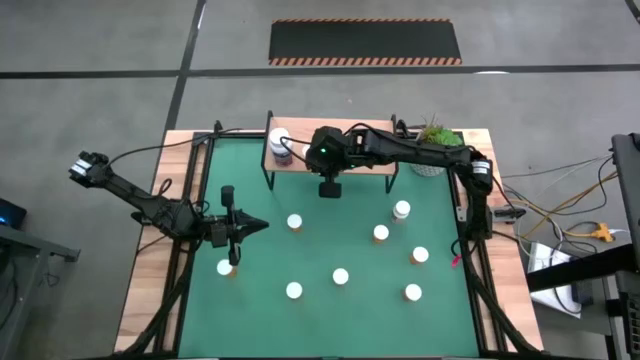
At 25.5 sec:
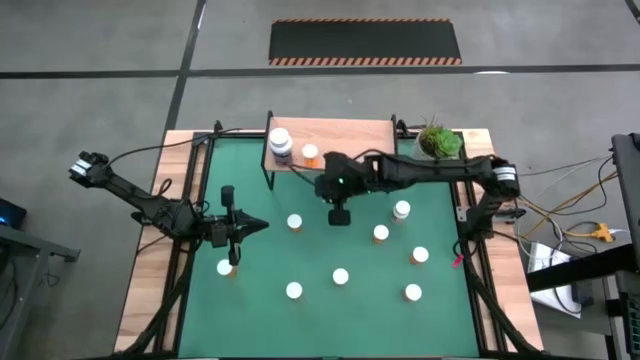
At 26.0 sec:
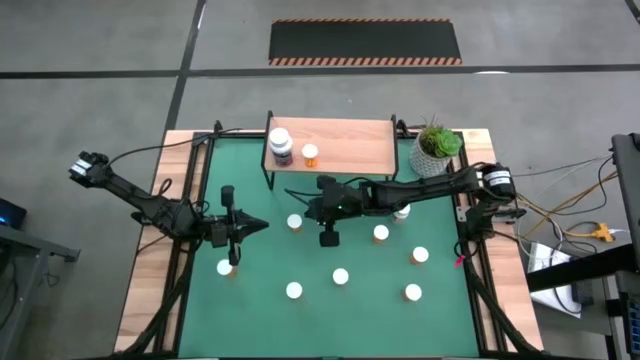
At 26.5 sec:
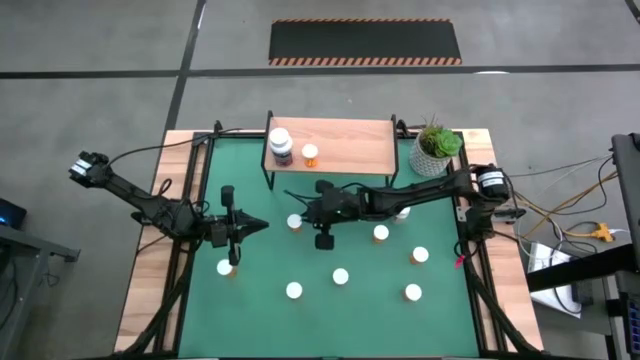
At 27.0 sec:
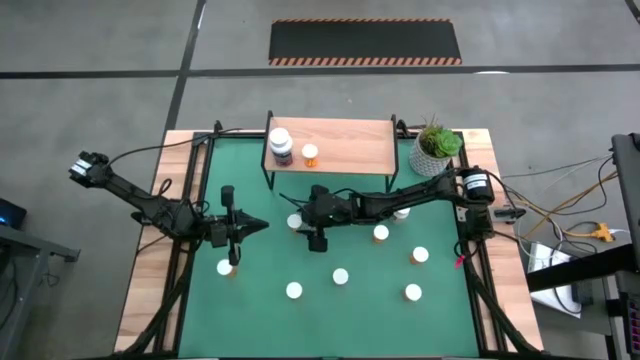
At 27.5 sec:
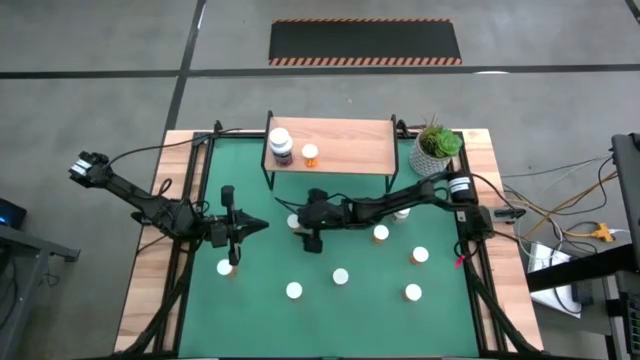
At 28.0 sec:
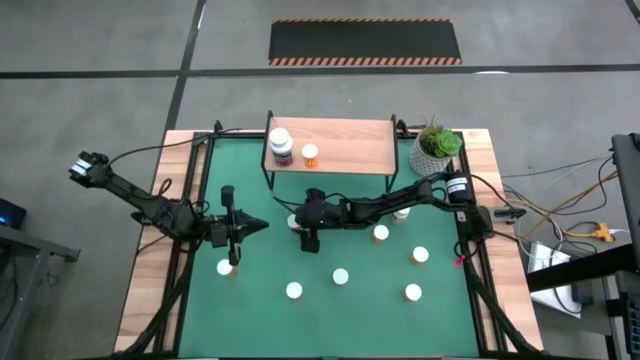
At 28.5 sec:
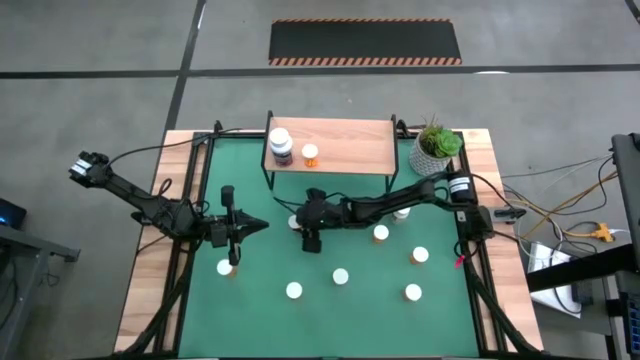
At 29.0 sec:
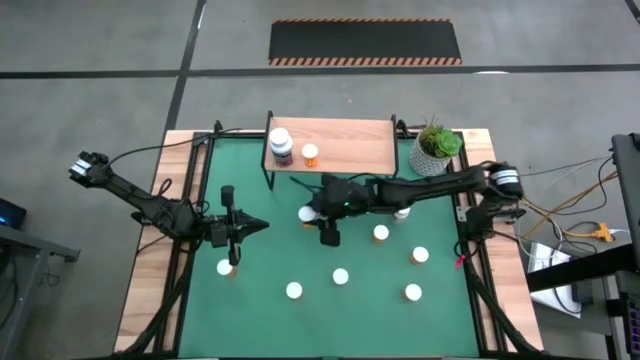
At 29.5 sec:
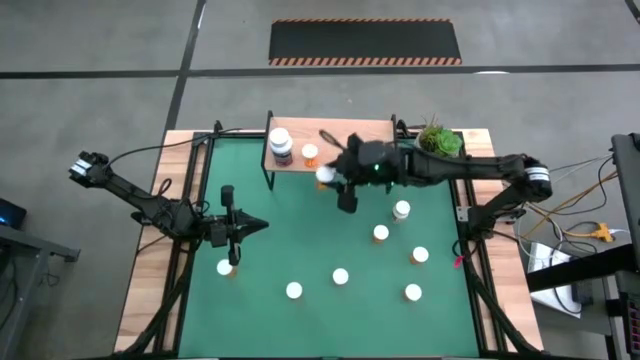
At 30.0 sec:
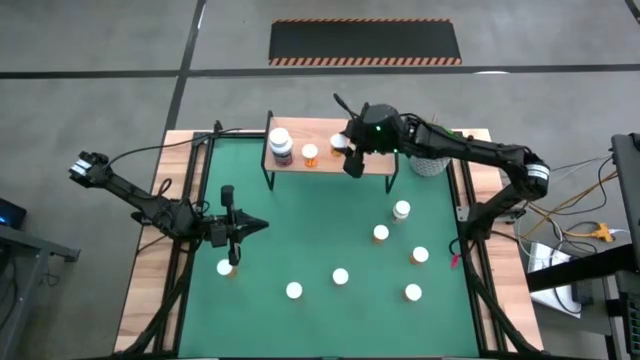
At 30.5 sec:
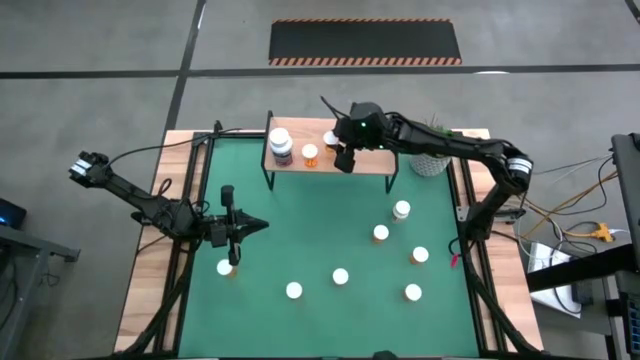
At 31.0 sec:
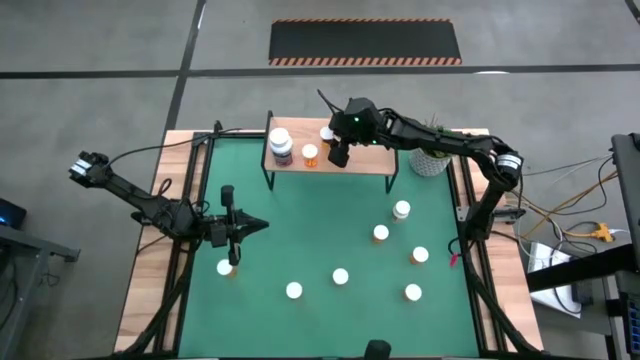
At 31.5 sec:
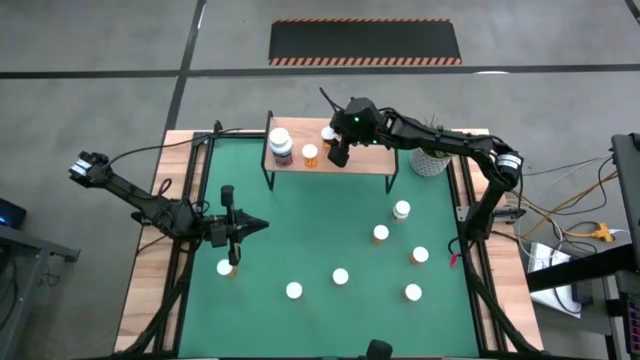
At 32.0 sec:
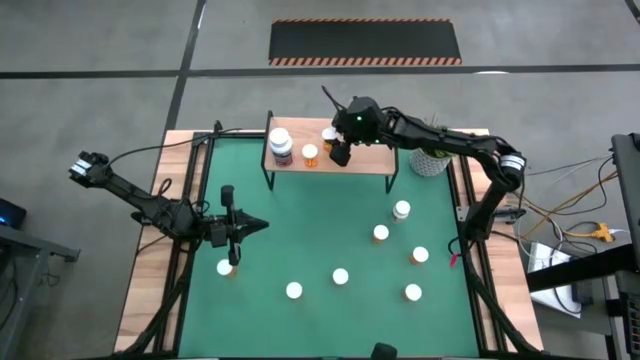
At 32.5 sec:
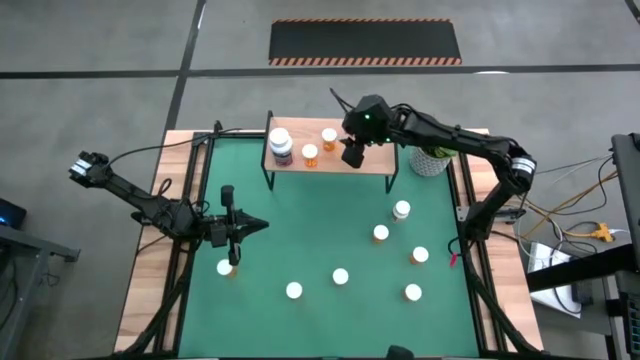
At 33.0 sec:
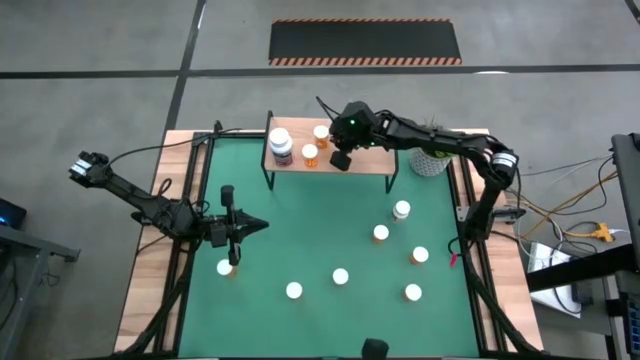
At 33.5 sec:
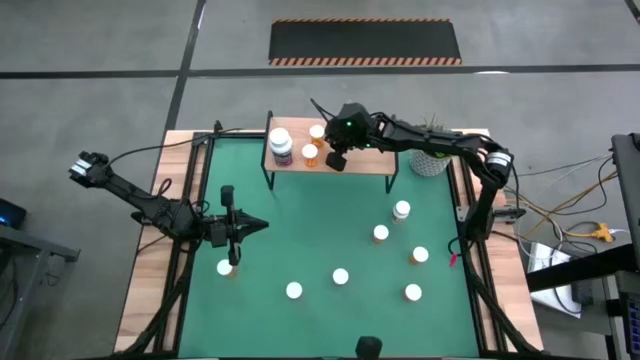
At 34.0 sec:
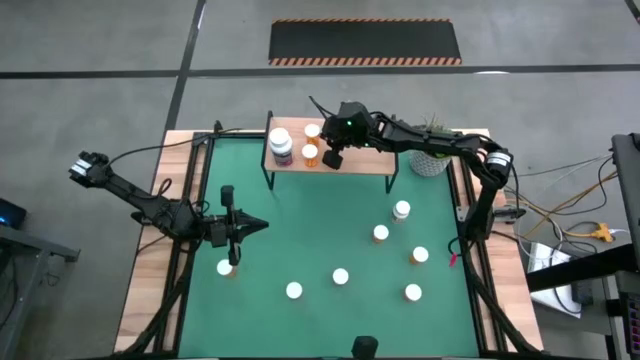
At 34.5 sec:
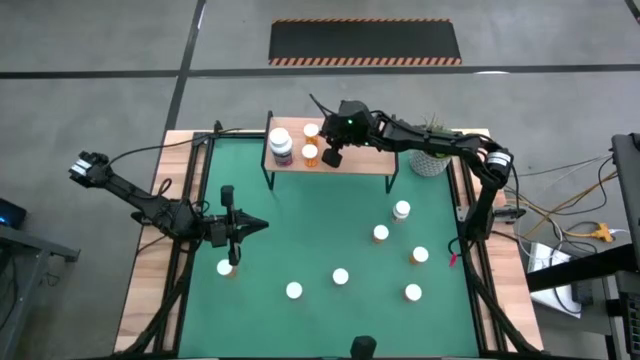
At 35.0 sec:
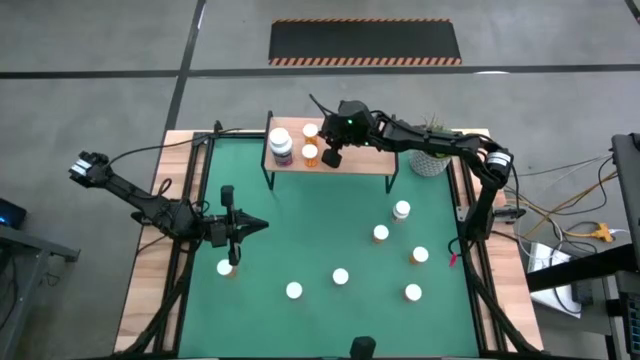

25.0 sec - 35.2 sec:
Task: Pick and place medicine bottles onto shelf by color
Put the orange pill bottle on the shelf aligned with the other orange pill bottle

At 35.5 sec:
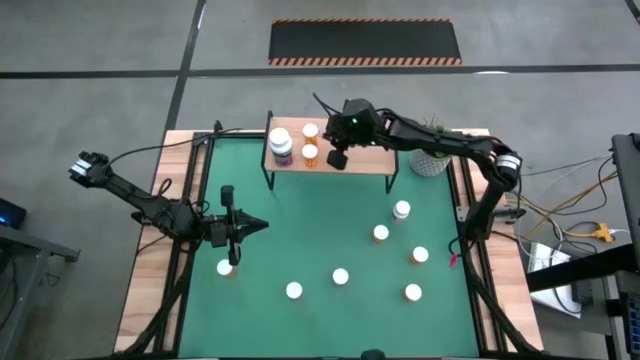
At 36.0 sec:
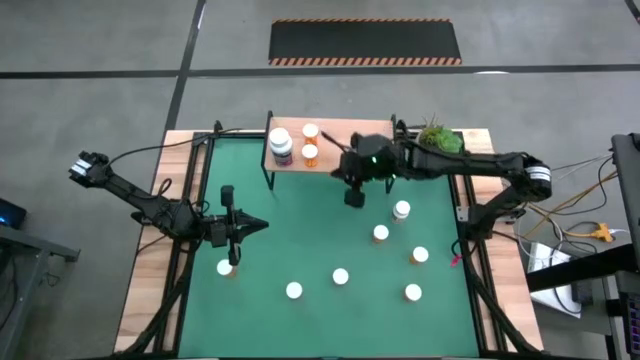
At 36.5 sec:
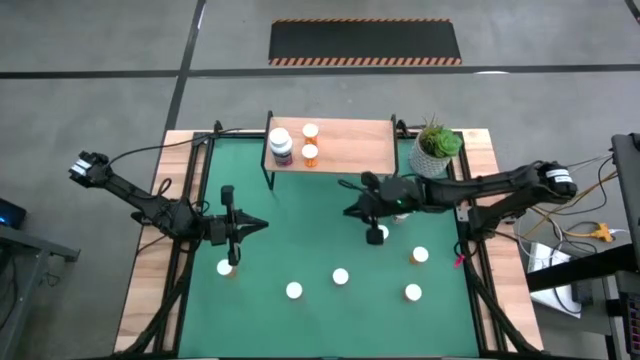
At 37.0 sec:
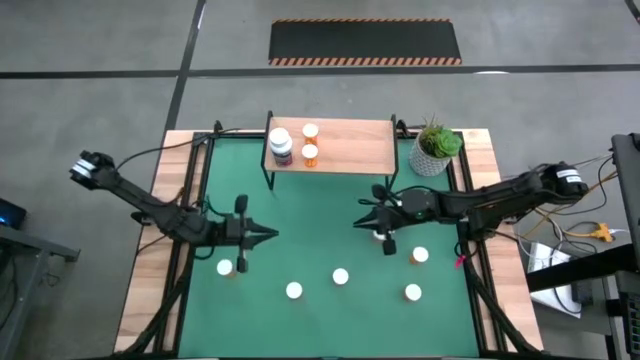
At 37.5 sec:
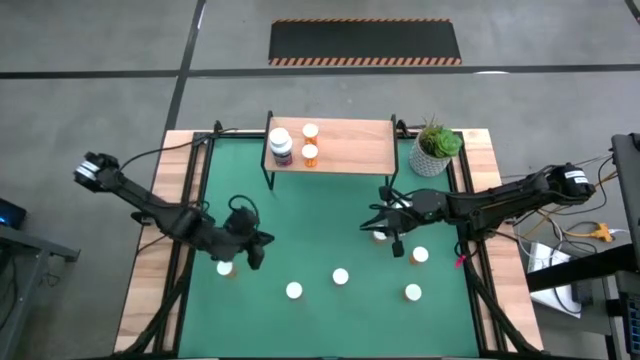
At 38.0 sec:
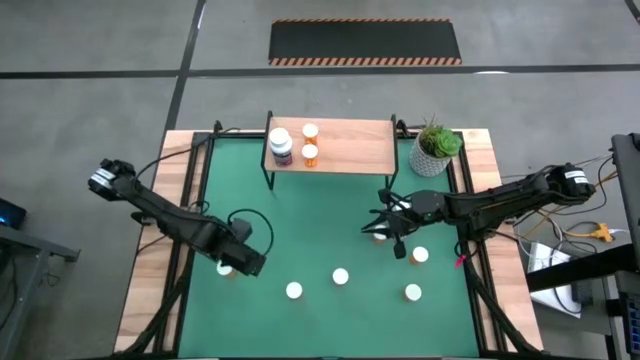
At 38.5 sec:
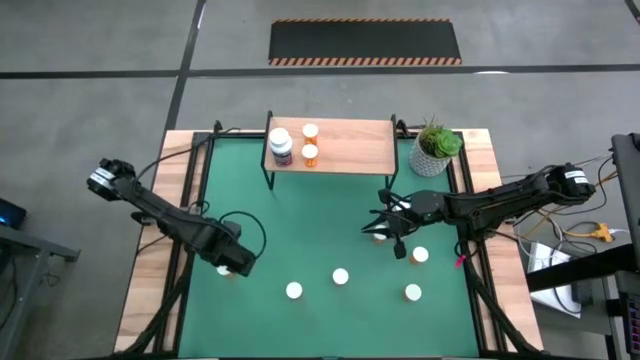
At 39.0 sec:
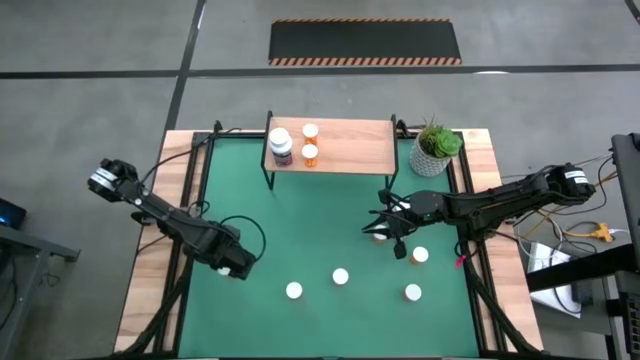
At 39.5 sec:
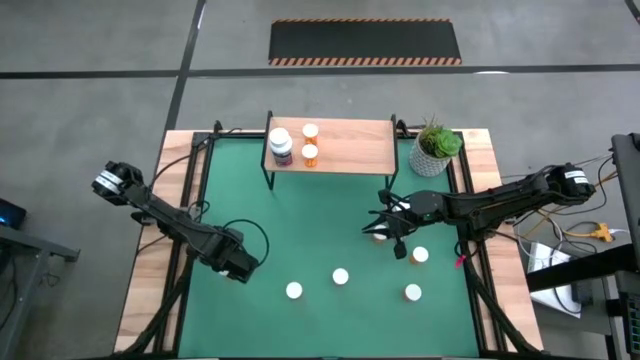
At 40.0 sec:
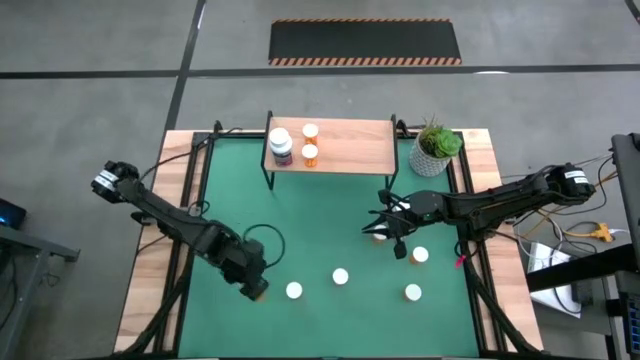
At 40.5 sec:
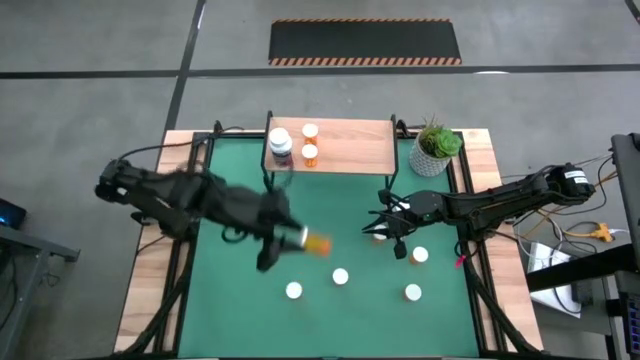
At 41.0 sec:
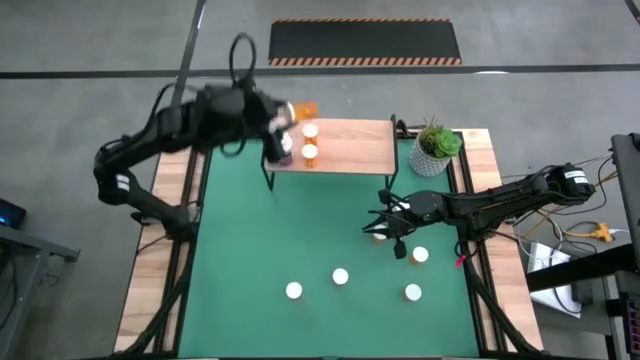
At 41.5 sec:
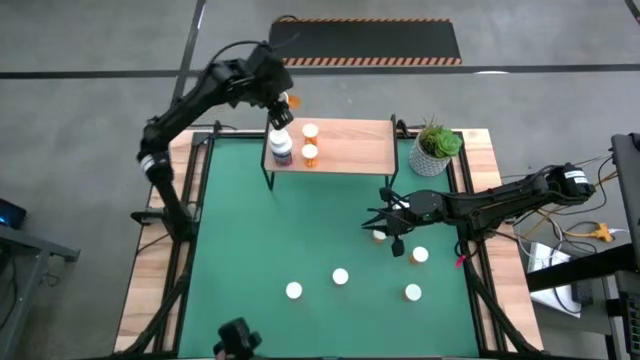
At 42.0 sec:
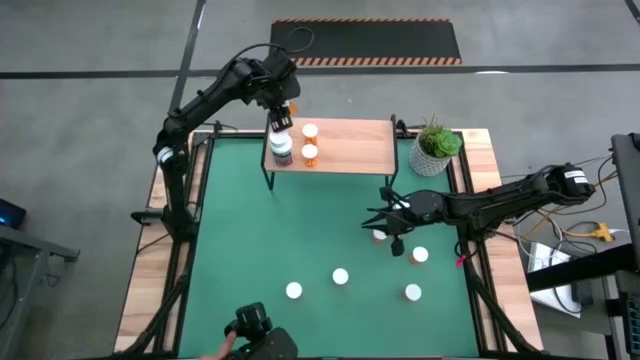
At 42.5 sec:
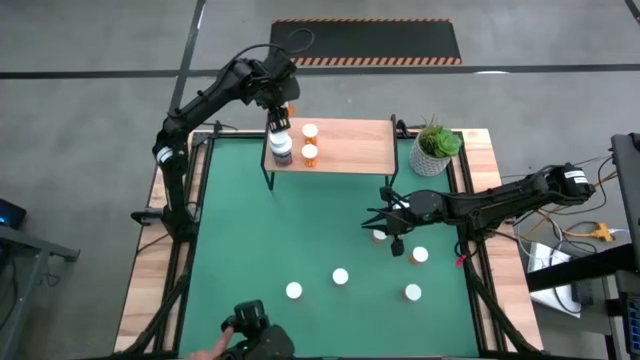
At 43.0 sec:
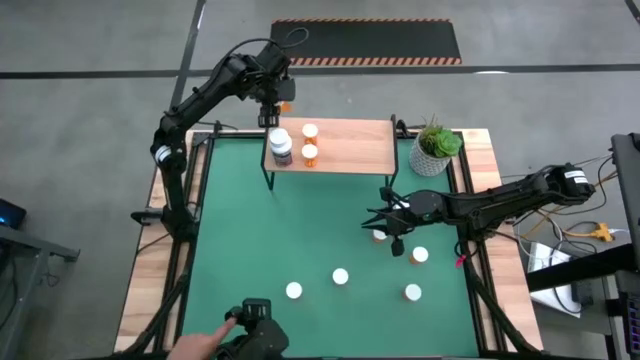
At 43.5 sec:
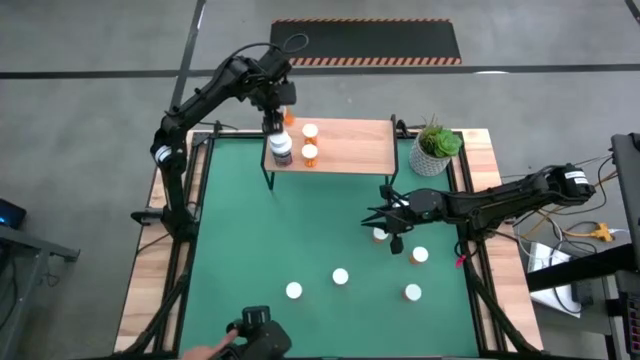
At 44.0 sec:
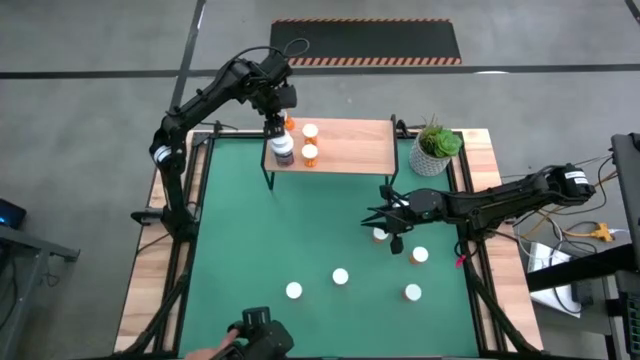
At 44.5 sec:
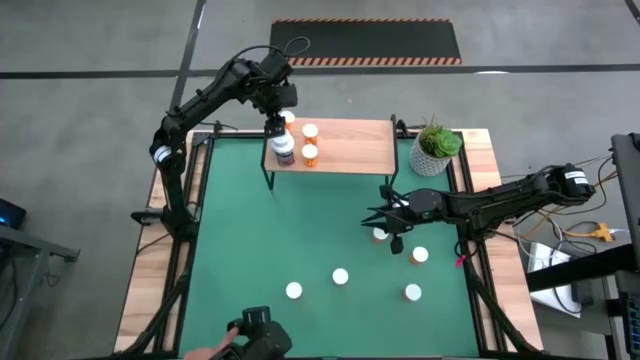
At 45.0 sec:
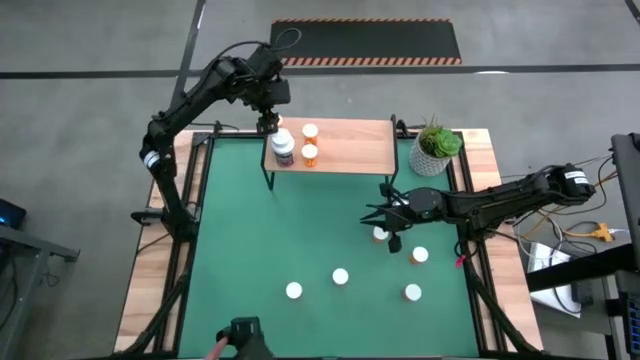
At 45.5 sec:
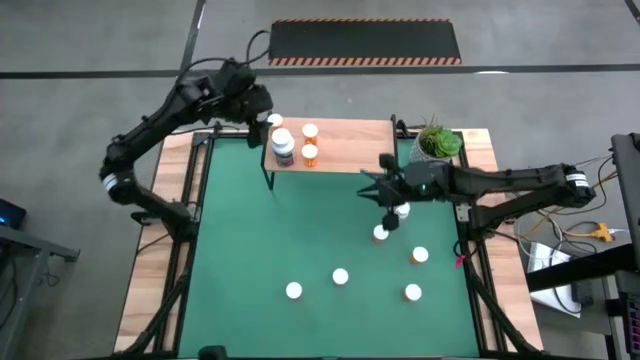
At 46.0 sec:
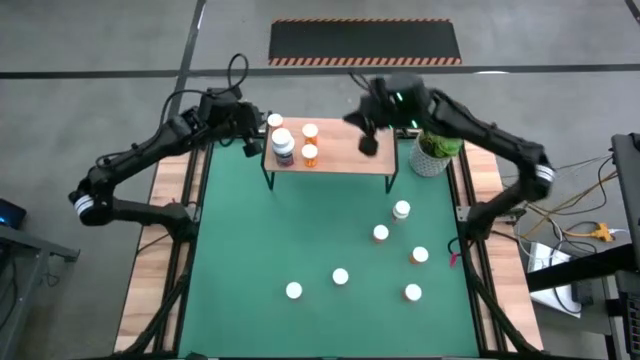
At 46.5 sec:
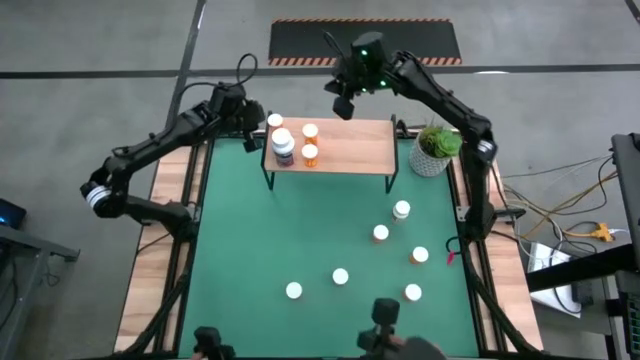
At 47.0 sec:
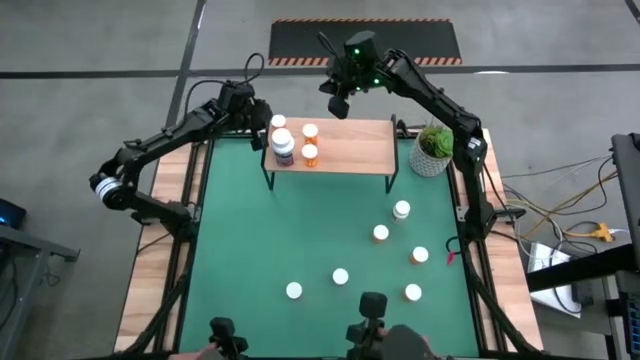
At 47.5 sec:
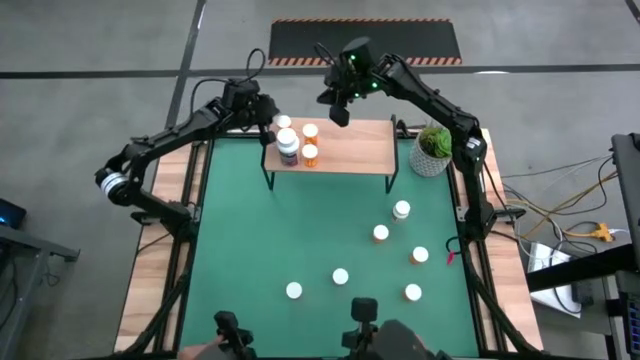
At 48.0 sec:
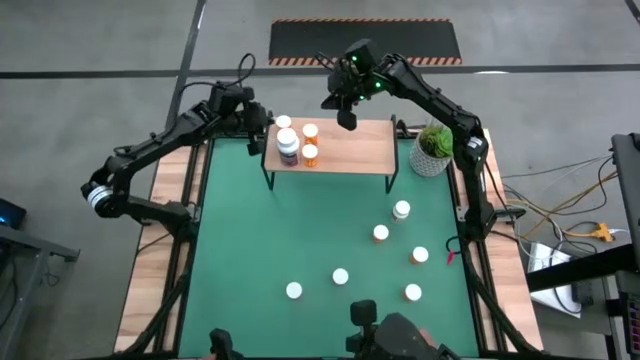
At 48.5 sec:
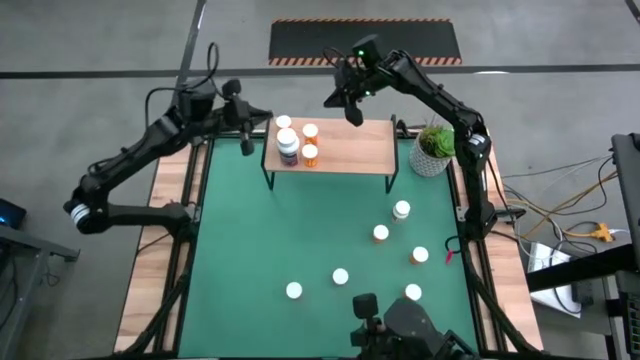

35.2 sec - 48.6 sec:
Put the orange pill bottle on the shelf aligned with the other orange pill bottle
